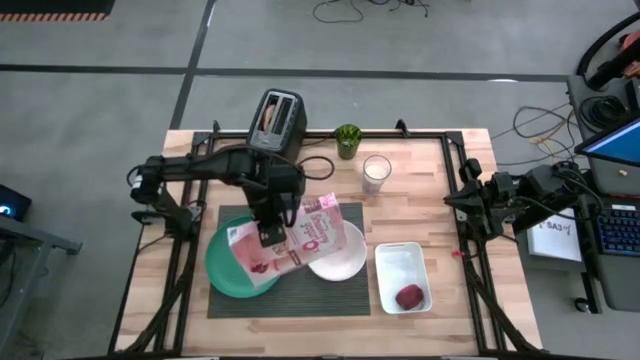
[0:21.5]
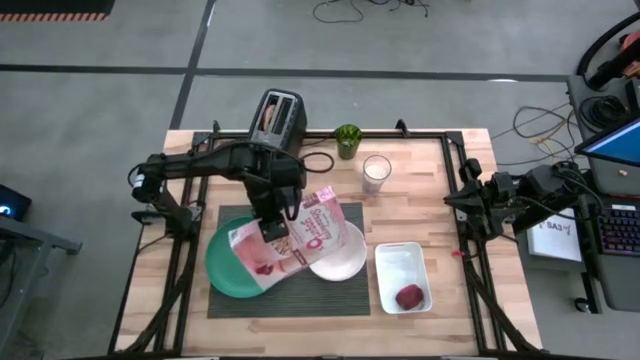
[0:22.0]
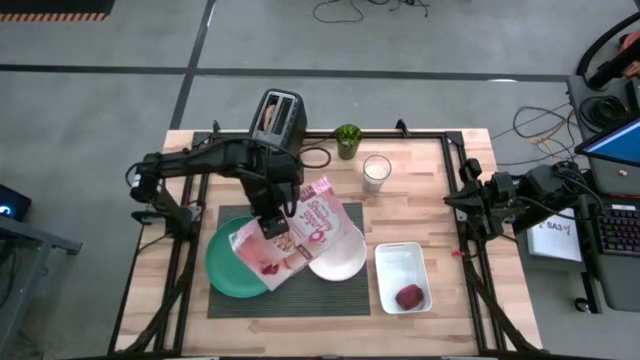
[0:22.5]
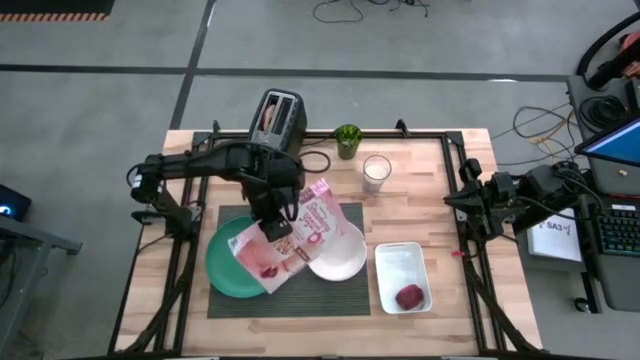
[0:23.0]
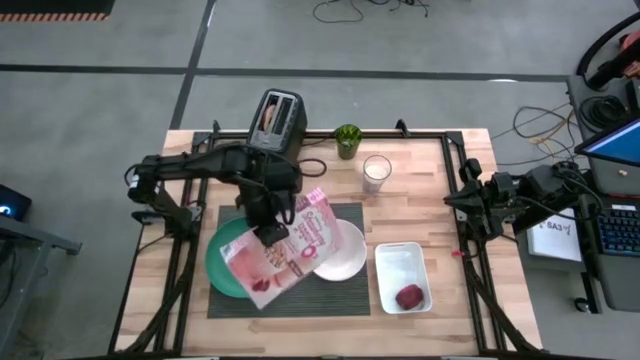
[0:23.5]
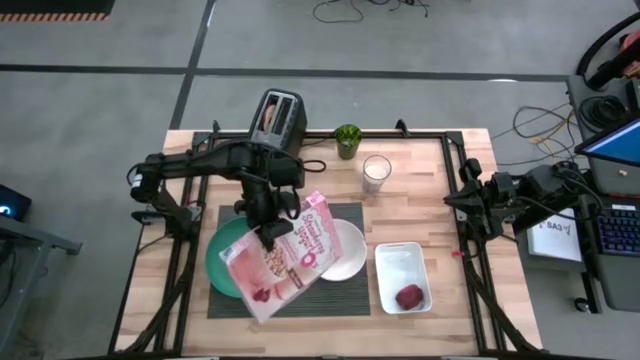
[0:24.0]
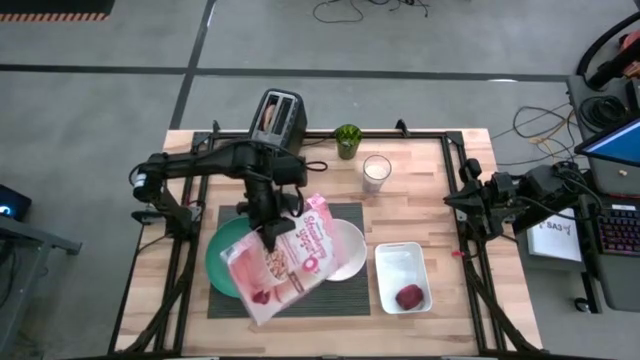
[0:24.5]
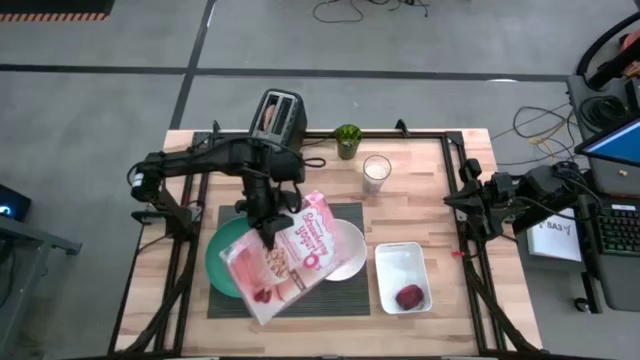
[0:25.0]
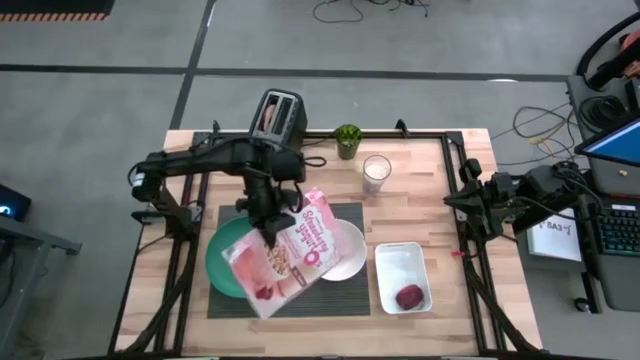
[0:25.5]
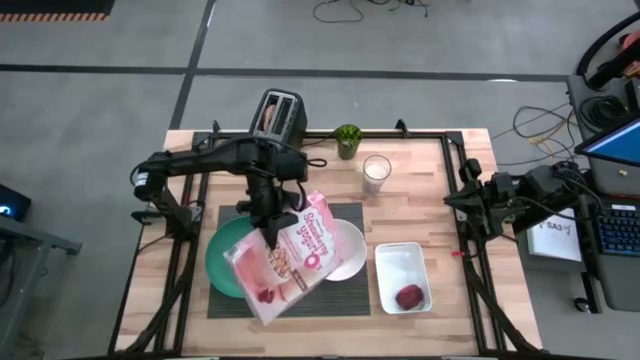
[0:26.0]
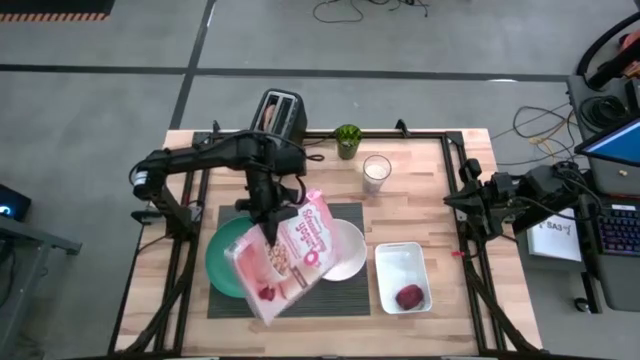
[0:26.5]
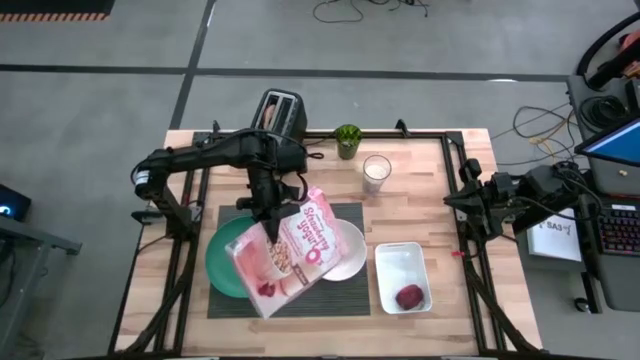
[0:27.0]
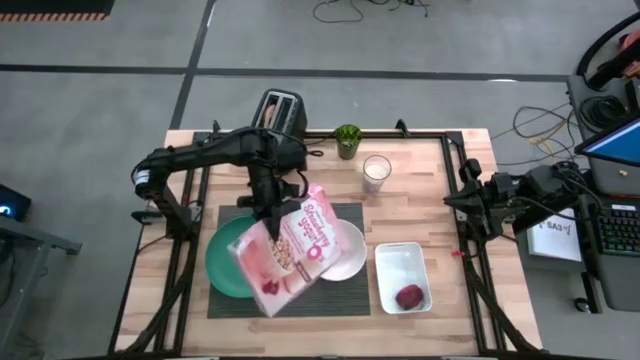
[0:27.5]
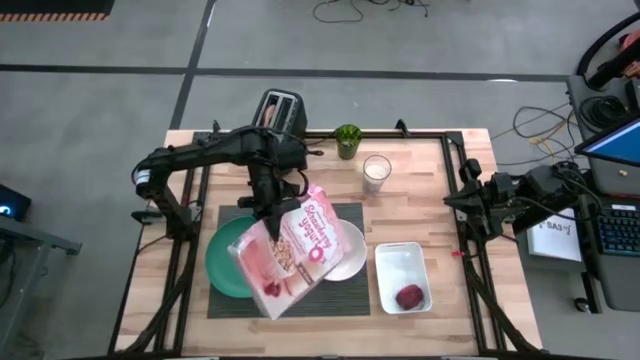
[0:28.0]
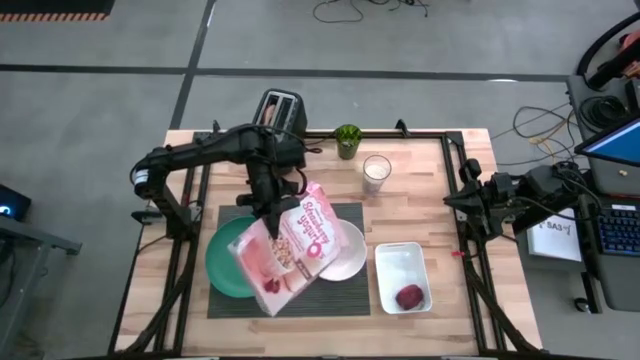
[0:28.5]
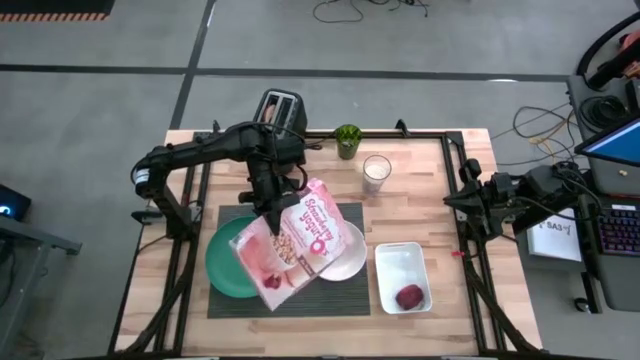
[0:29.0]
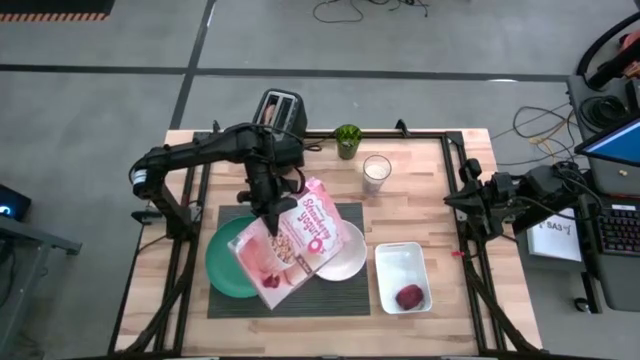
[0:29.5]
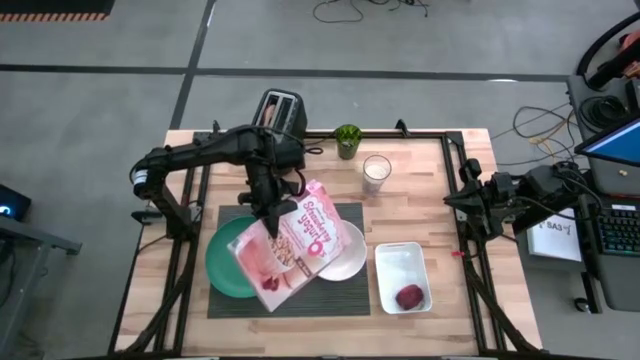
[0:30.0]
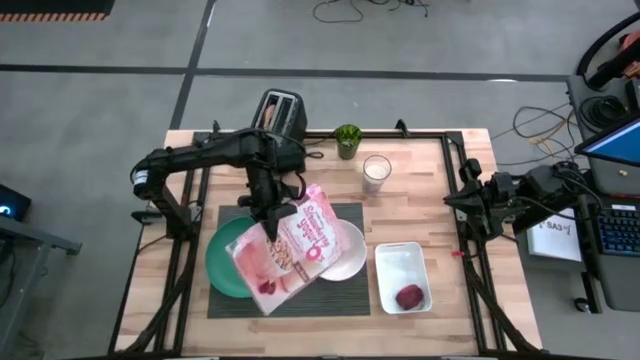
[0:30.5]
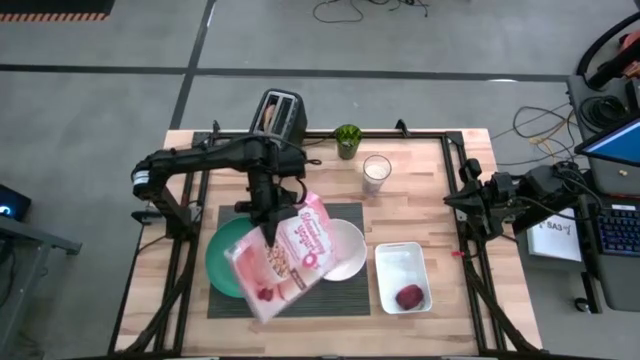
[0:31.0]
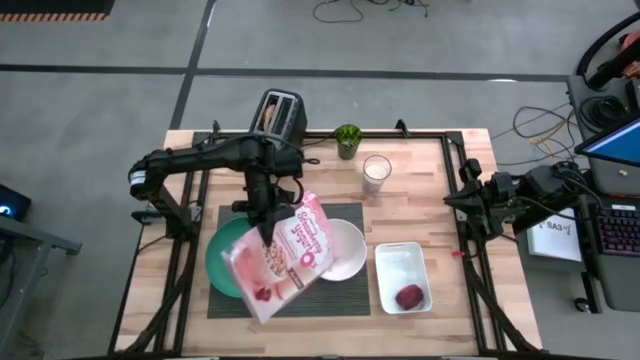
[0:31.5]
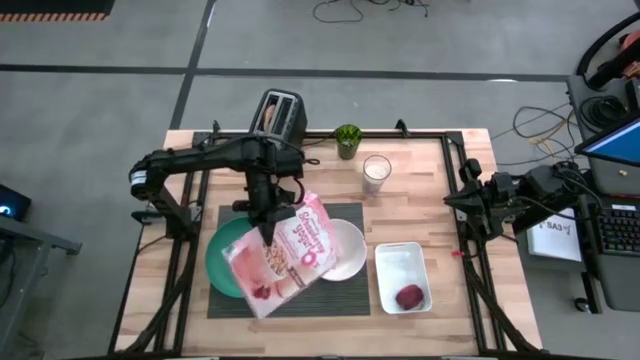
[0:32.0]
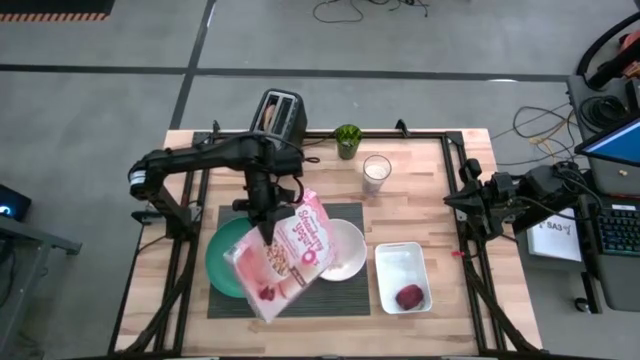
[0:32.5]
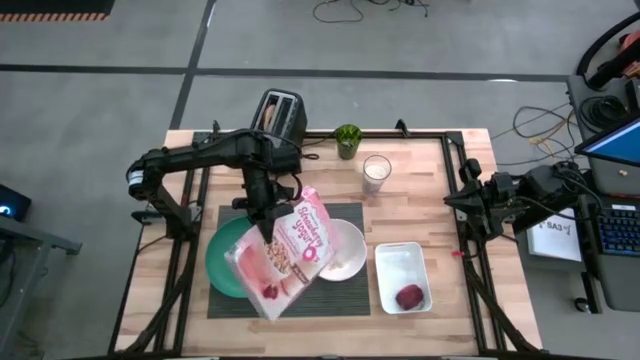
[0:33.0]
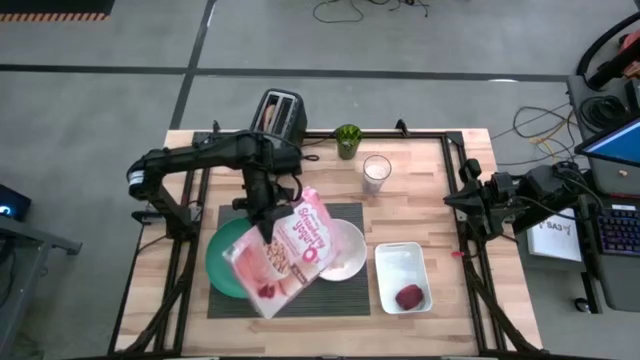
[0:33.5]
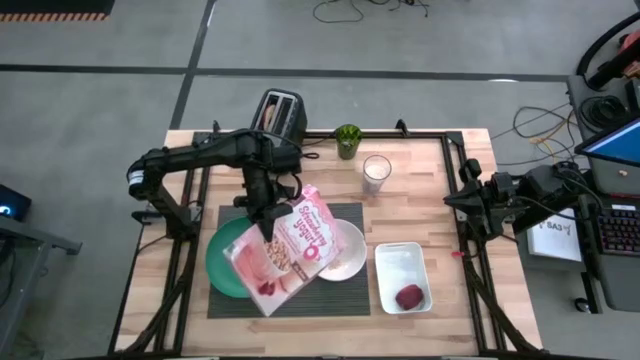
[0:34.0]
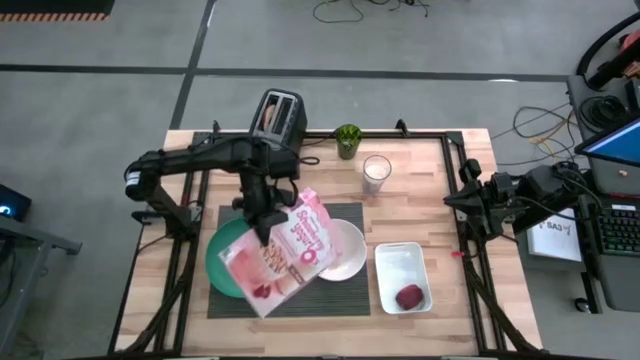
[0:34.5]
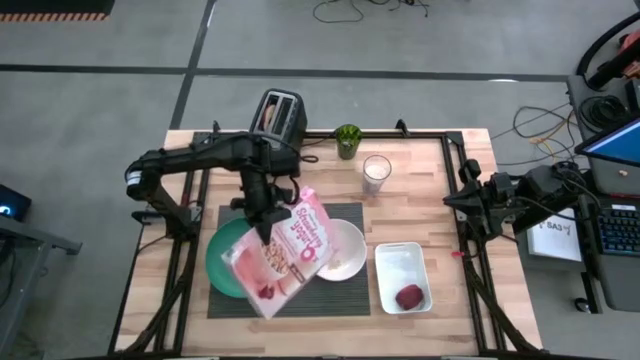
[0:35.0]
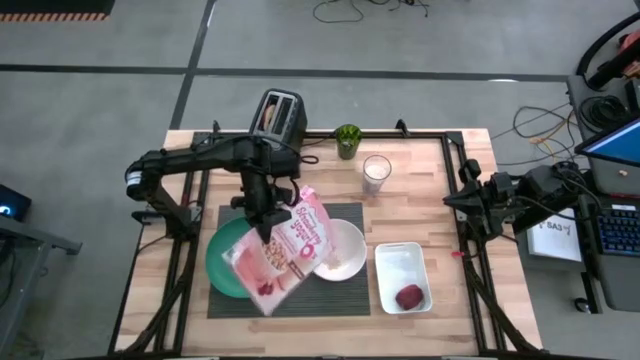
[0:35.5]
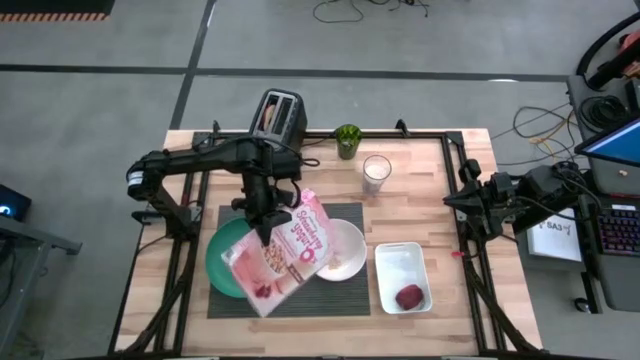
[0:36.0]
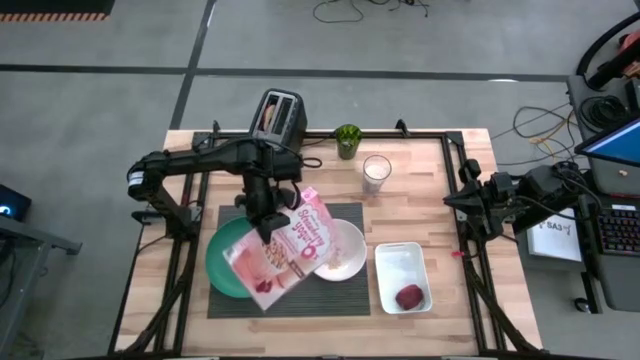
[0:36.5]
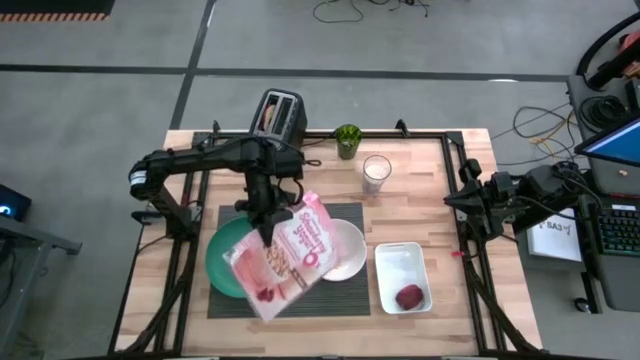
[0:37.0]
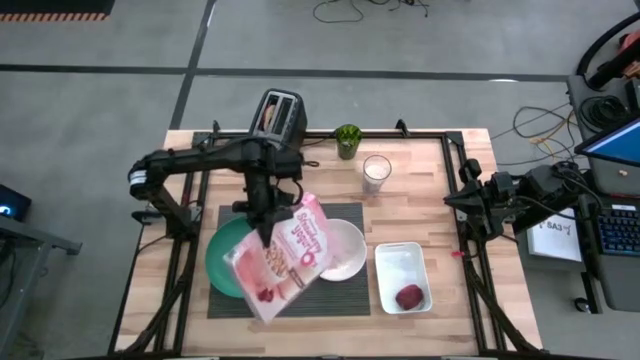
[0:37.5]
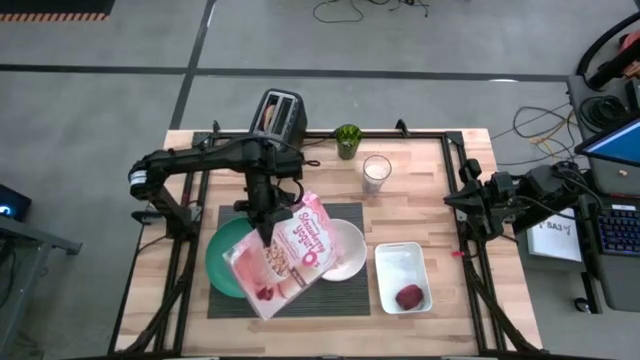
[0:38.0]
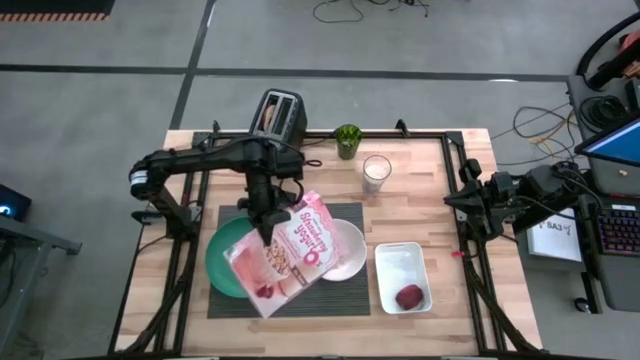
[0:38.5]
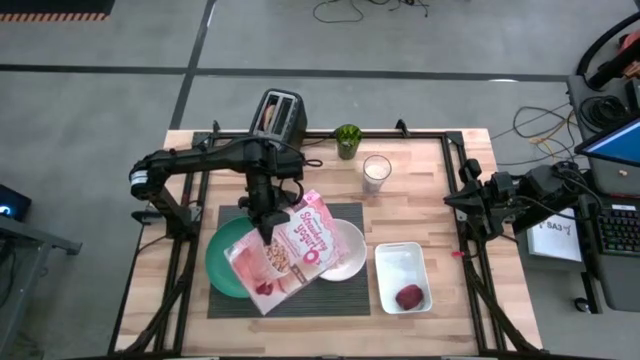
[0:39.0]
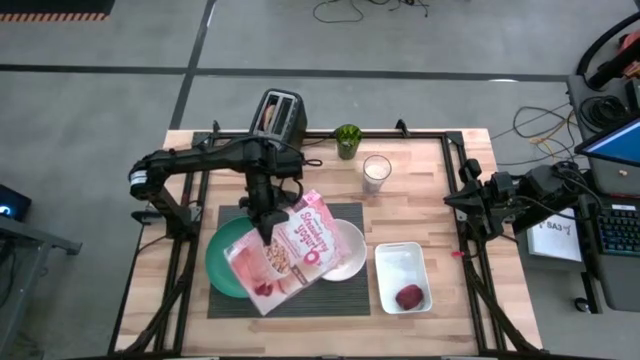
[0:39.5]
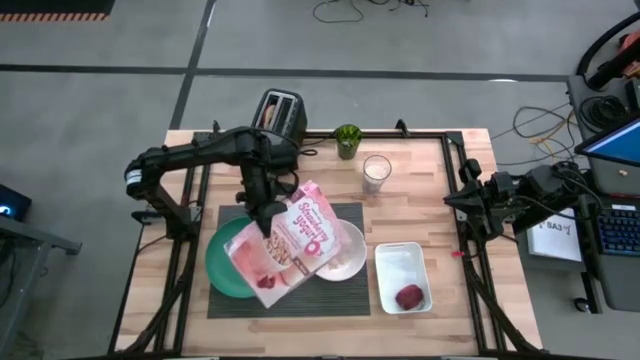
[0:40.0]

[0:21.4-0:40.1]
Task: Arrange a breakfast setting
Pour the cereal into the white bowl

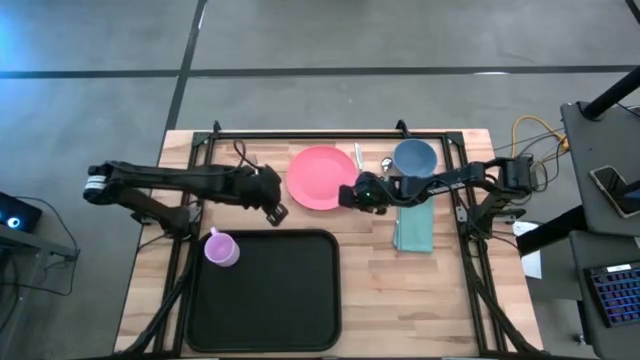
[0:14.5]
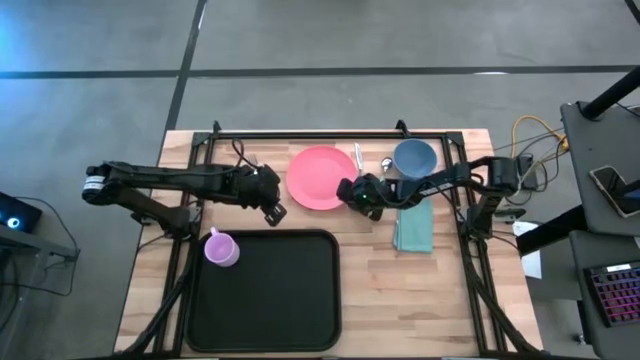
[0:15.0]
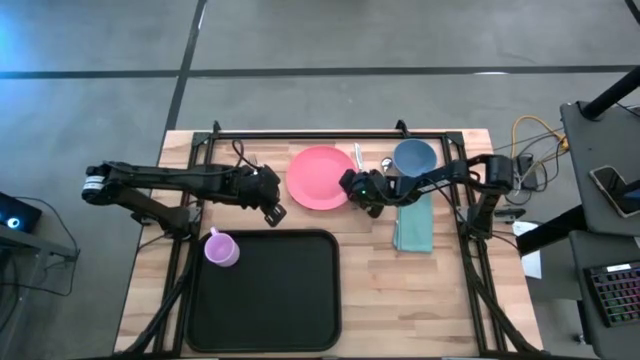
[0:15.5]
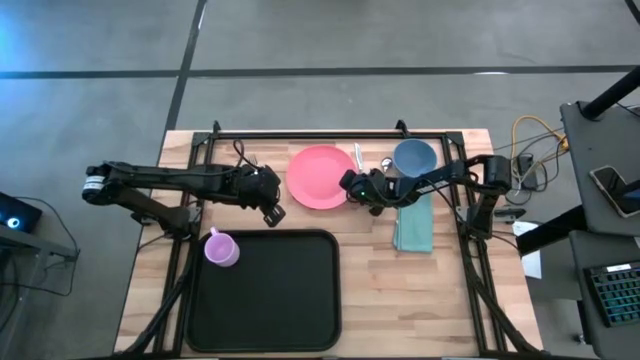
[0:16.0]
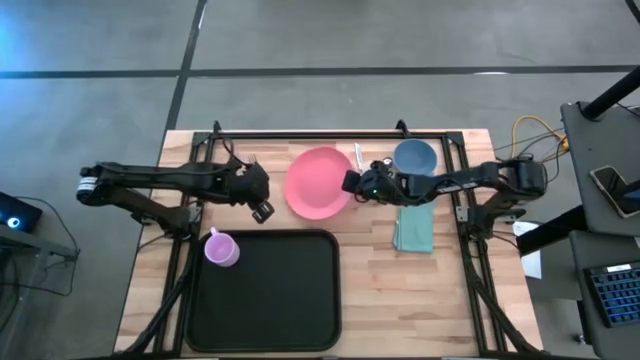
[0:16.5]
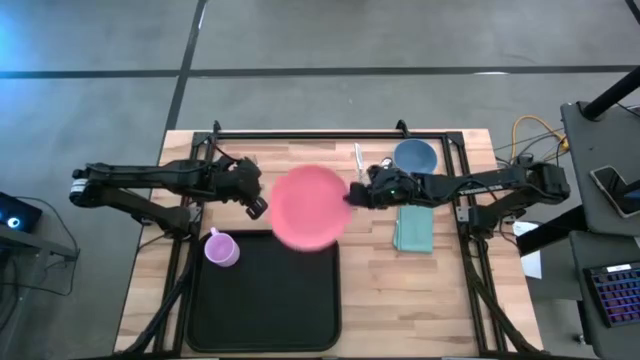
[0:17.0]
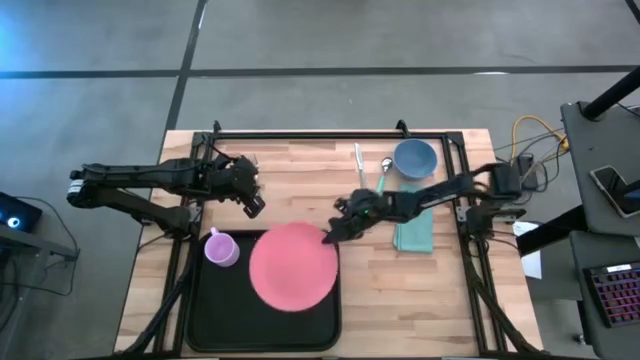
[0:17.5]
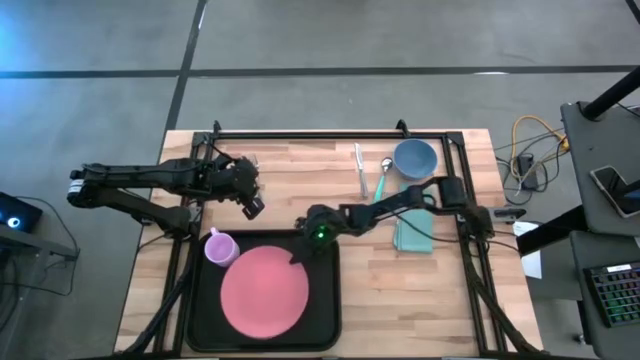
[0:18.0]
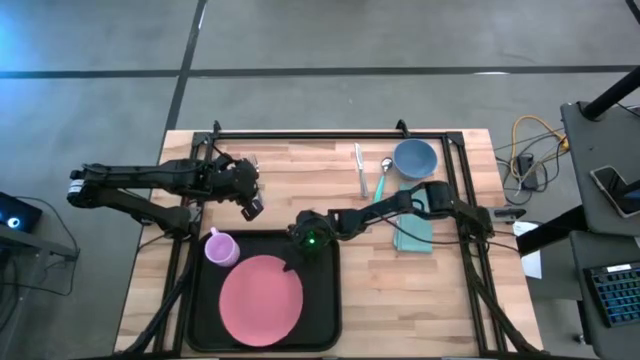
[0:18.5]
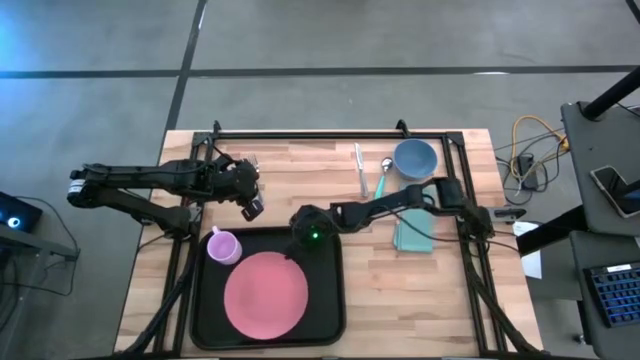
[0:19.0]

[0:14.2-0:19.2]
Task: Set up tray
Put the pink plate on the black tray
